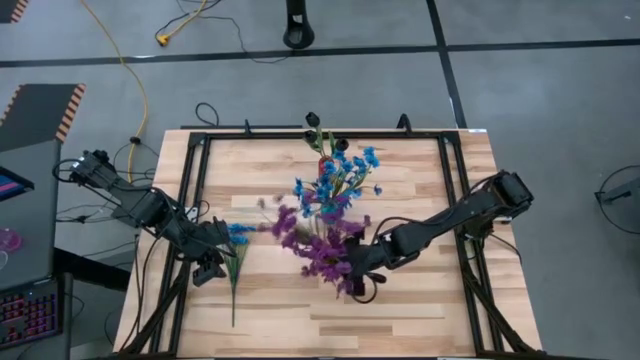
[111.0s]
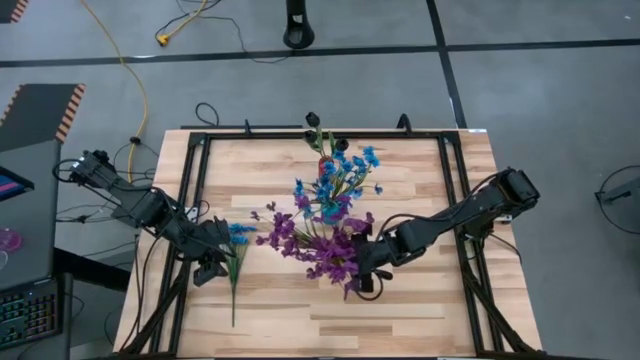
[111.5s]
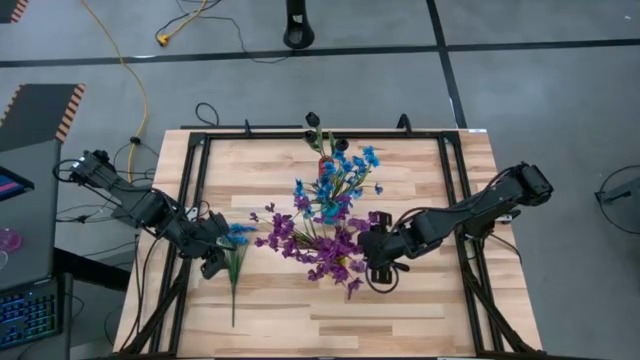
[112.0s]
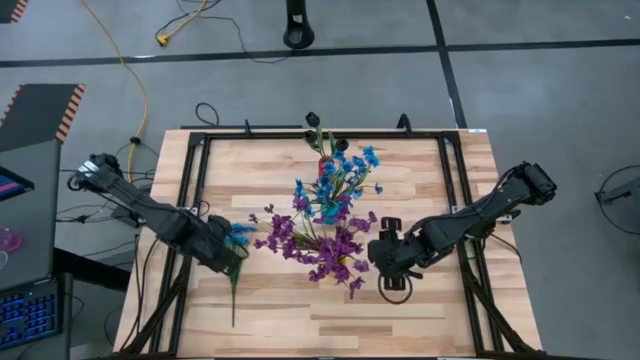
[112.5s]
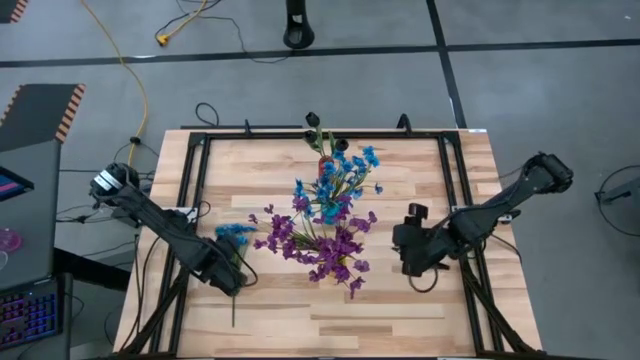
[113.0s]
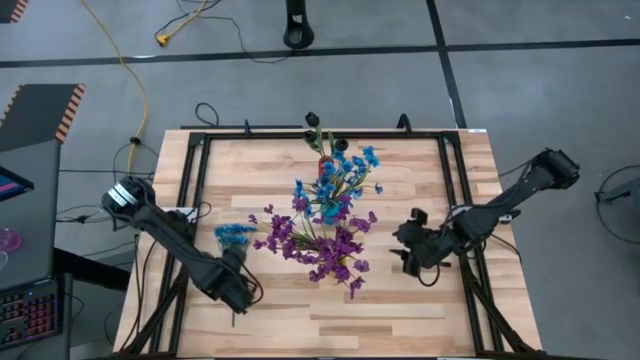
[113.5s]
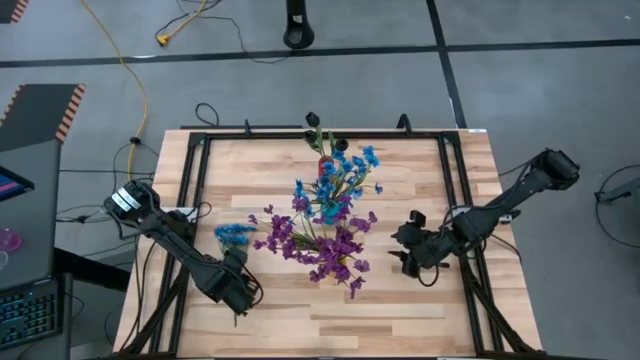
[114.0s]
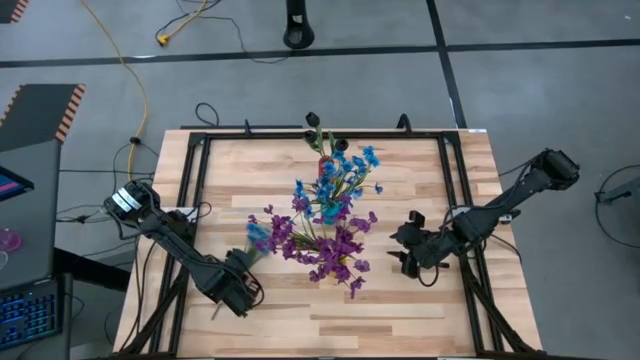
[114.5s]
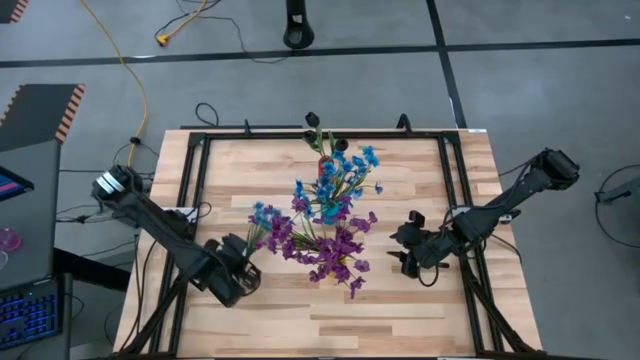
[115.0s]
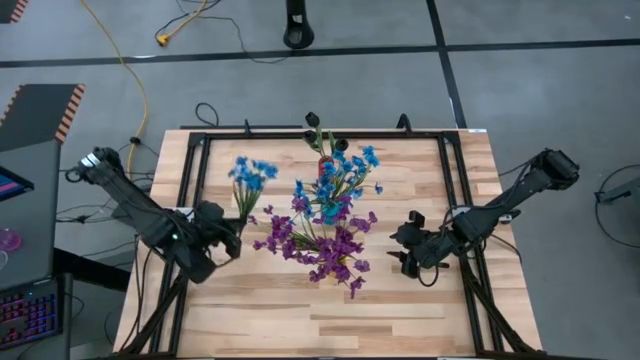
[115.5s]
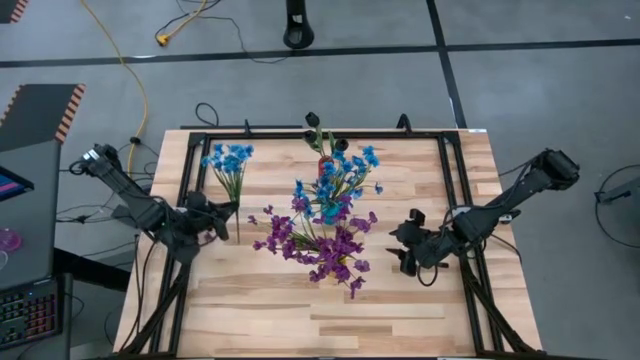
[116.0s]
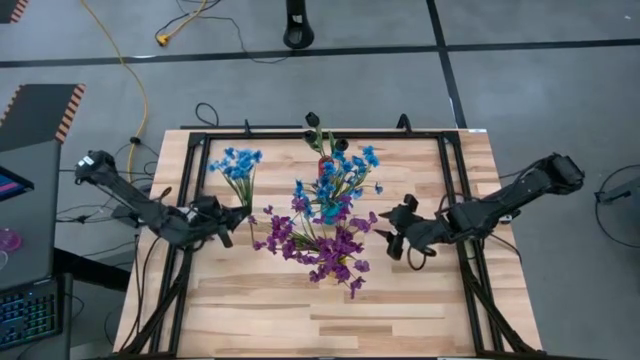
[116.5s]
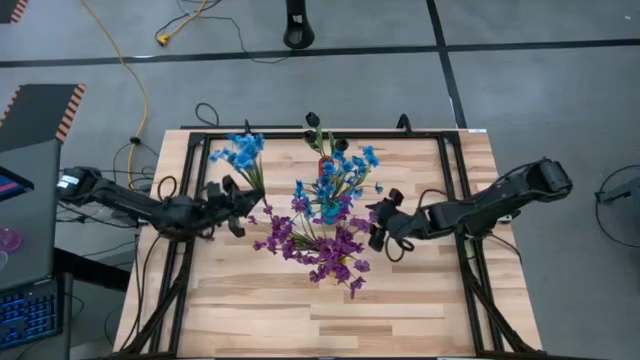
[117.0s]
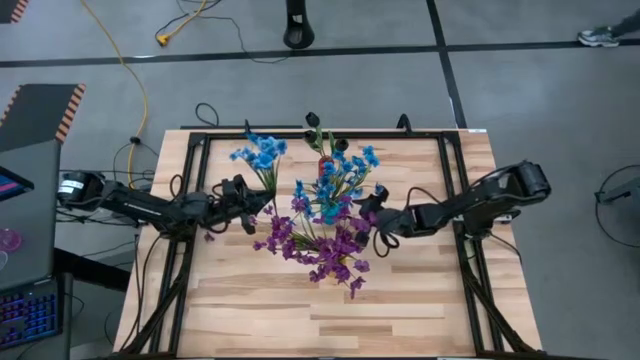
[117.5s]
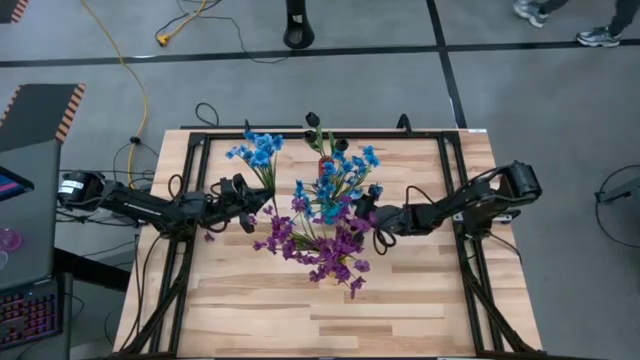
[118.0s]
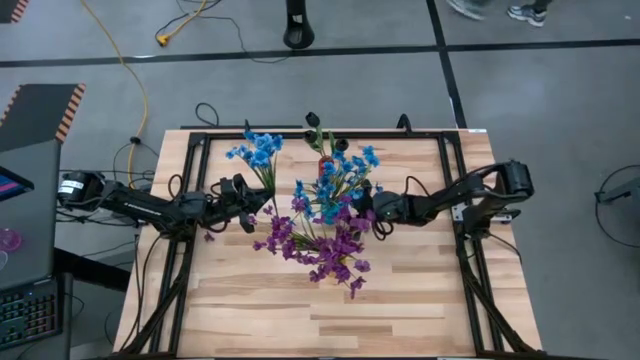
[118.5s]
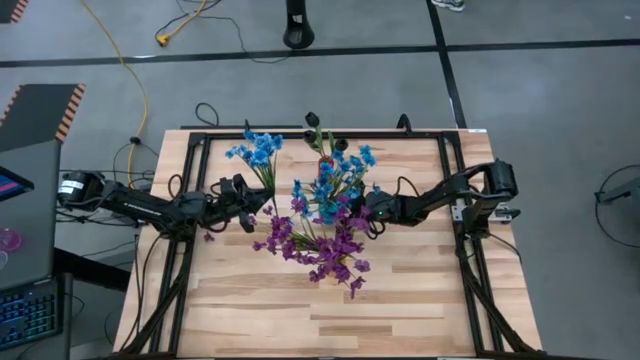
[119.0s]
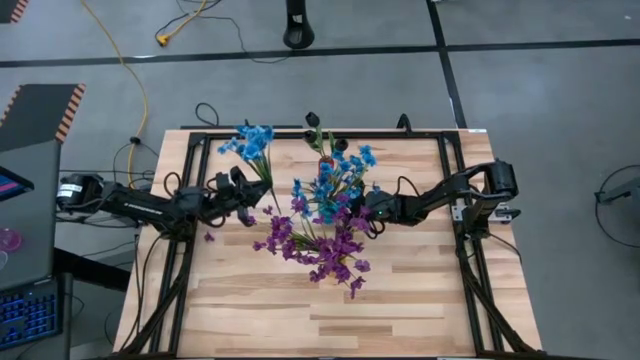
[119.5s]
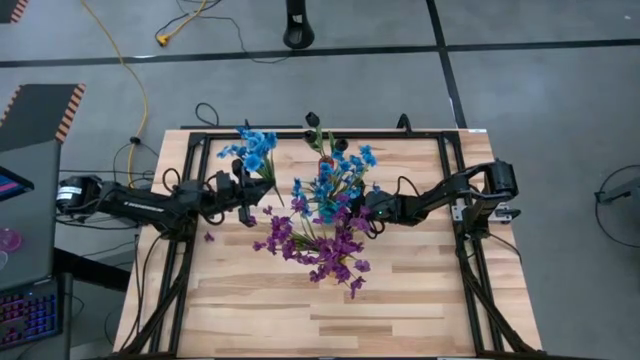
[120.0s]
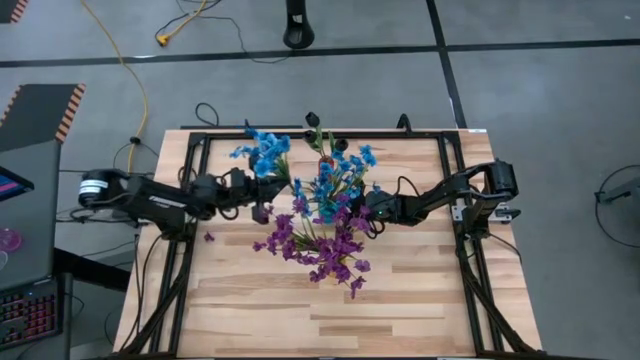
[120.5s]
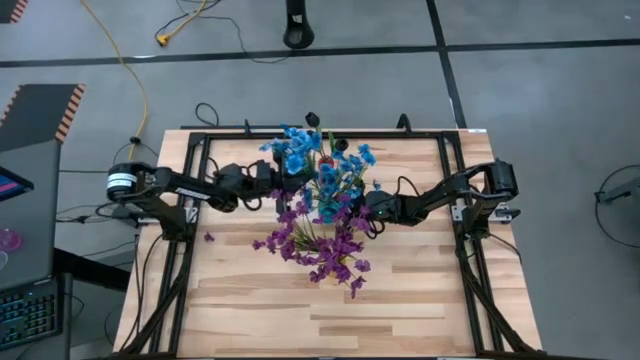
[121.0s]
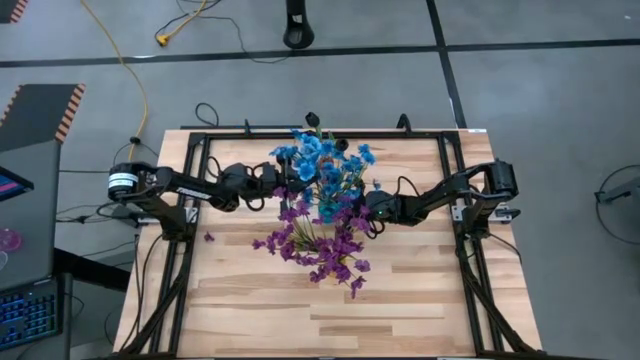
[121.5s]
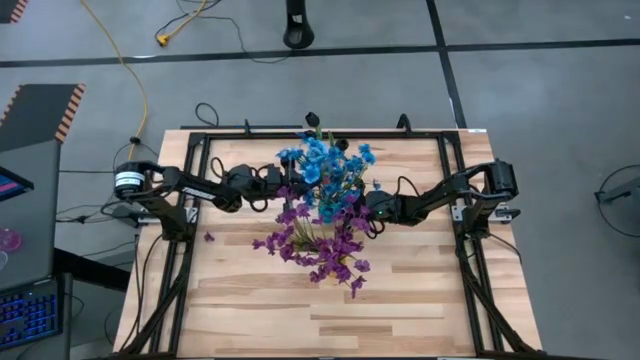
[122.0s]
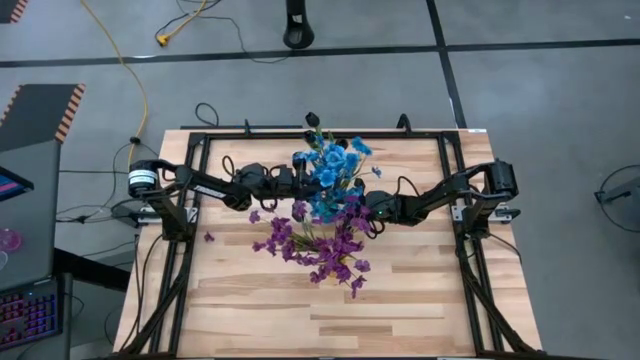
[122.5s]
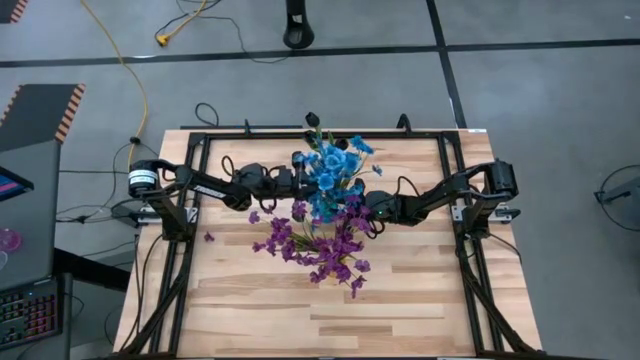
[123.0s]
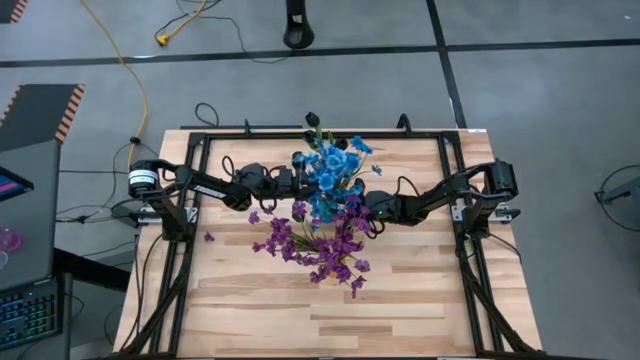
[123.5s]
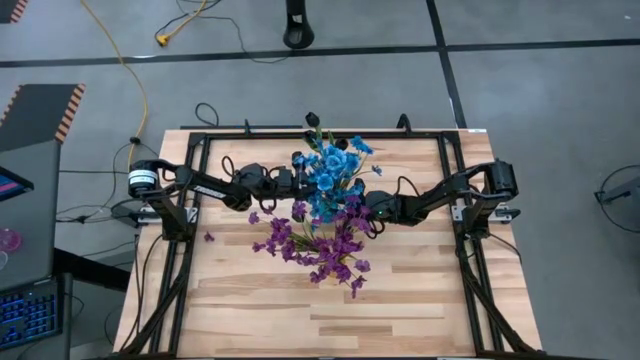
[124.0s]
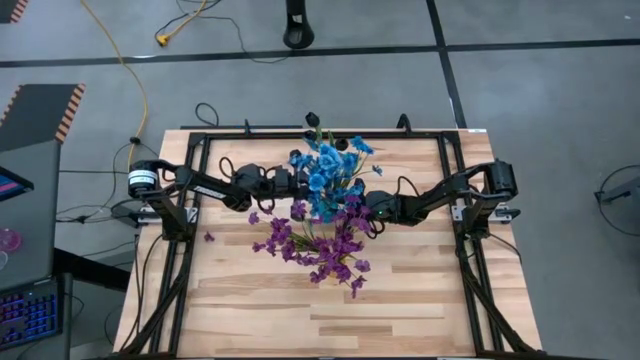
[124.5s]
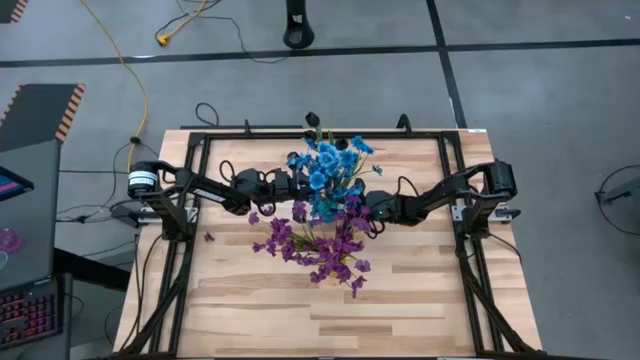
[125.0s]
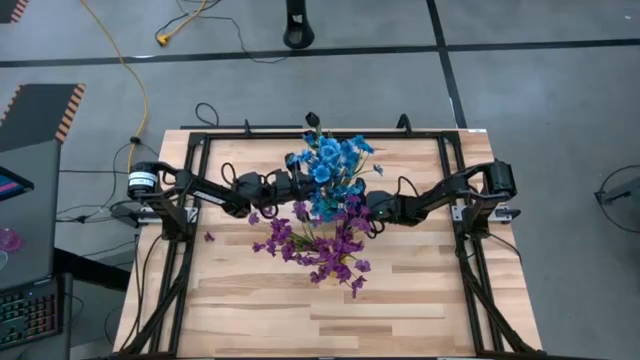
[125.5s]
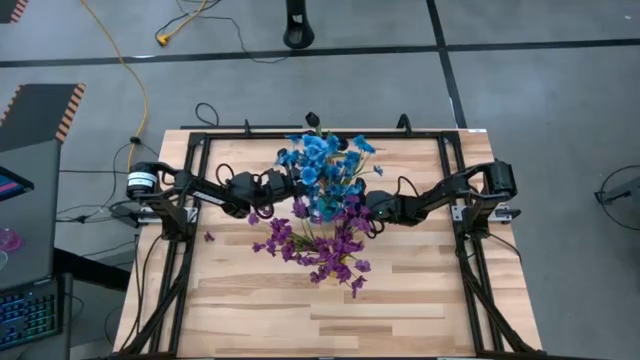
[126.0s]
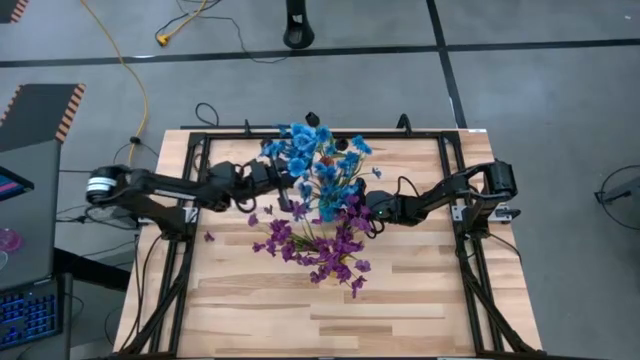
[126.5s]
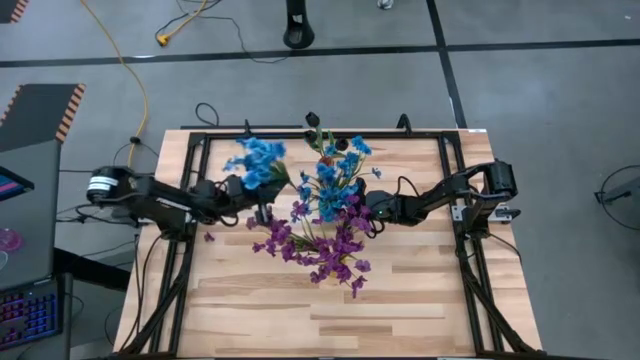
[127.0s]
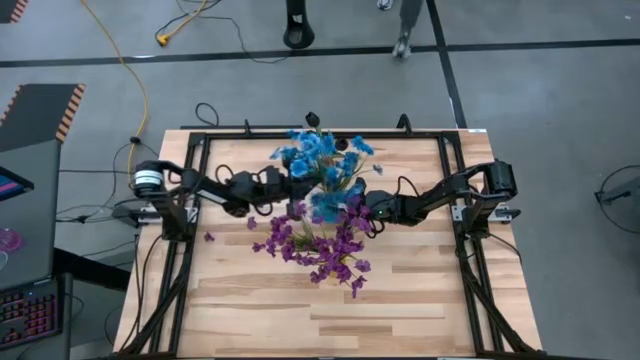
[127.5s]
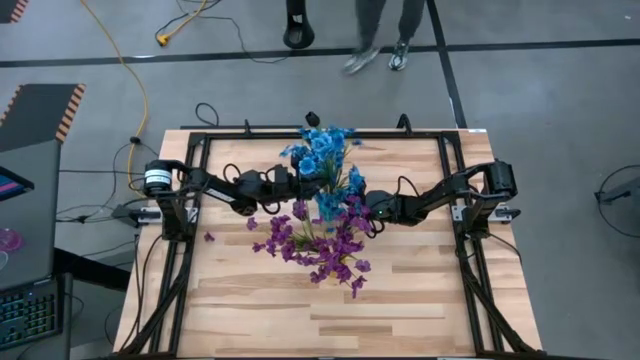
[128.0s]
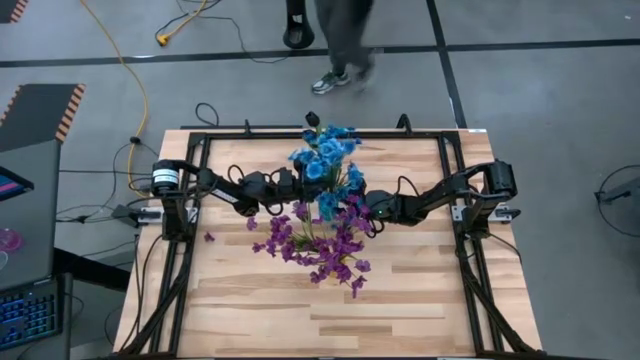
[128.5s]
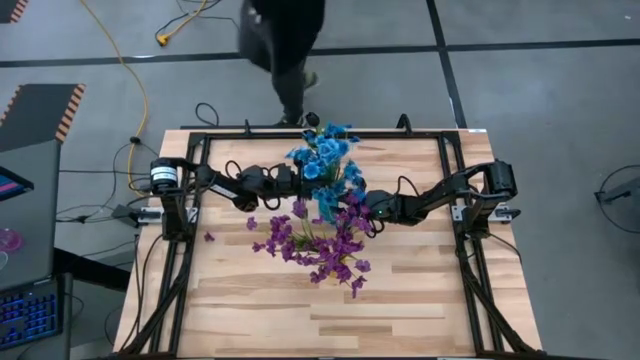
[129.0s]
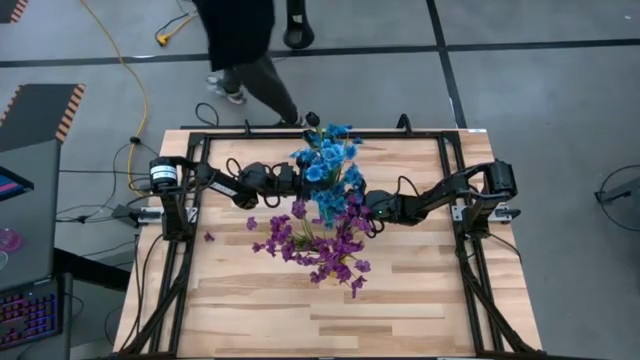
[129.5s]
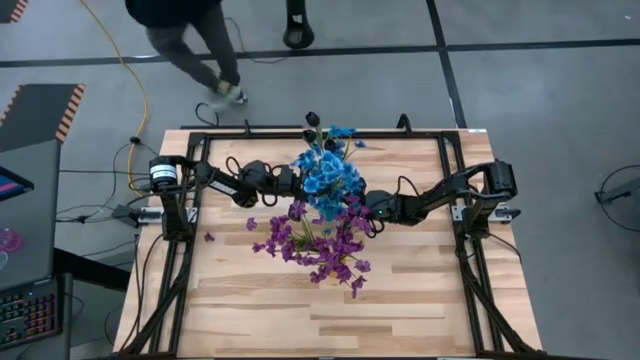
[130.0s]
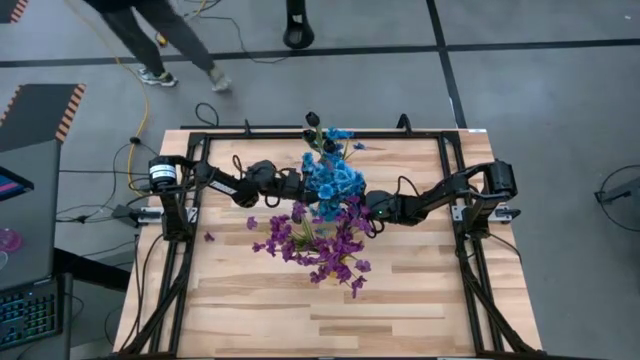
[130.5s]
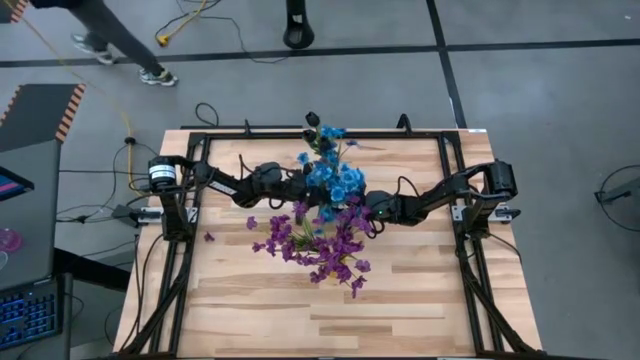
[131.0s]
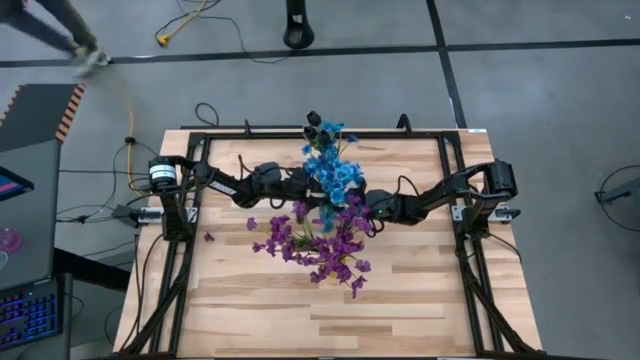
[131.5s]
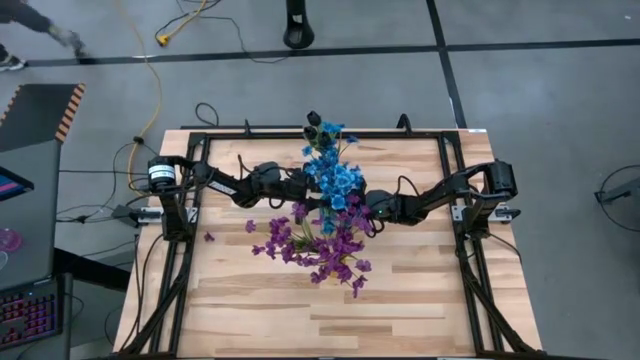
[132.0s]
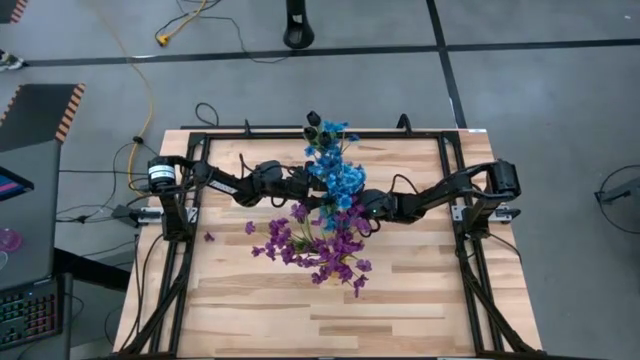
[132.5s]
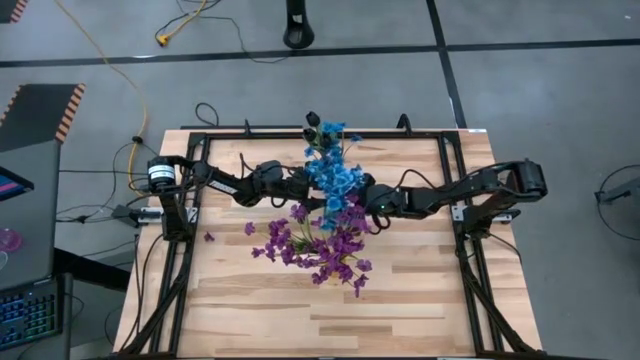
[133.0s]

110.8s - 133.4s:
Task: Sort flowers into vase by color
Put the blue flower into the blue crystal vase
